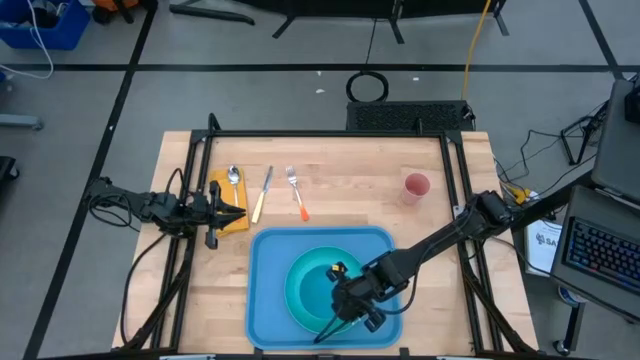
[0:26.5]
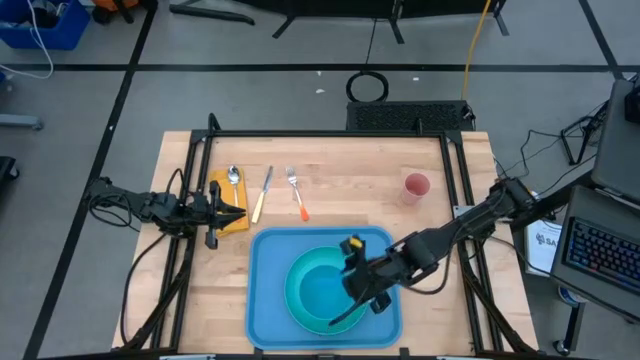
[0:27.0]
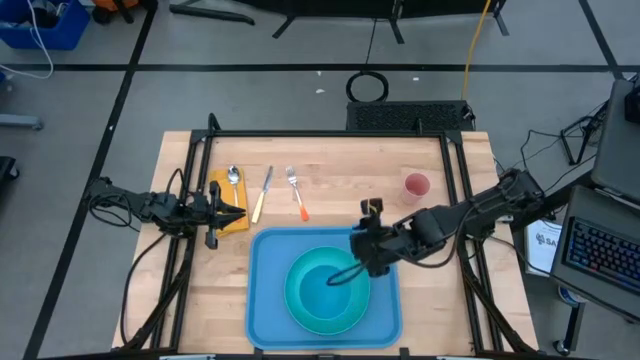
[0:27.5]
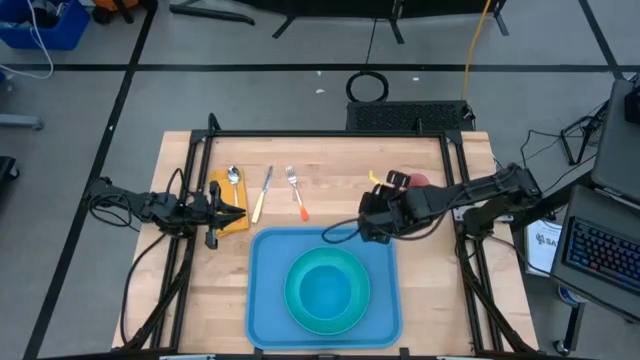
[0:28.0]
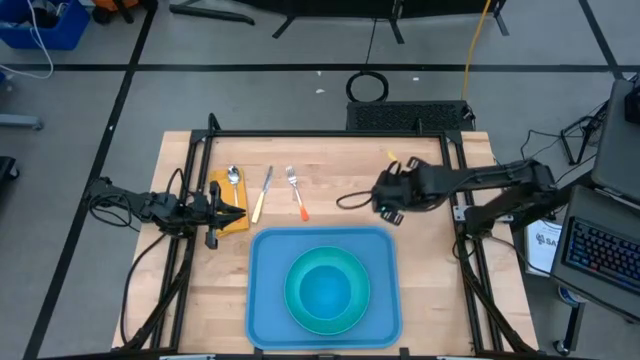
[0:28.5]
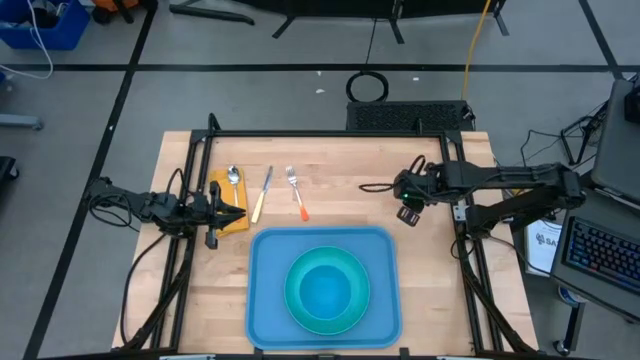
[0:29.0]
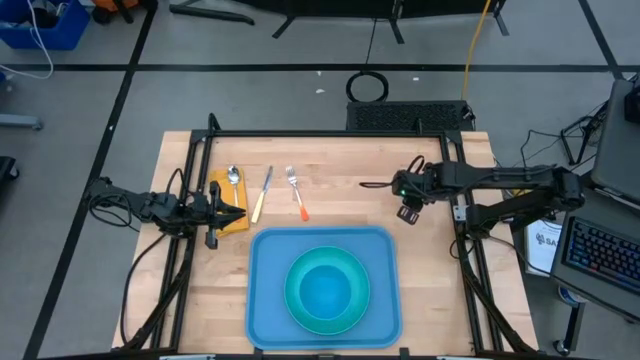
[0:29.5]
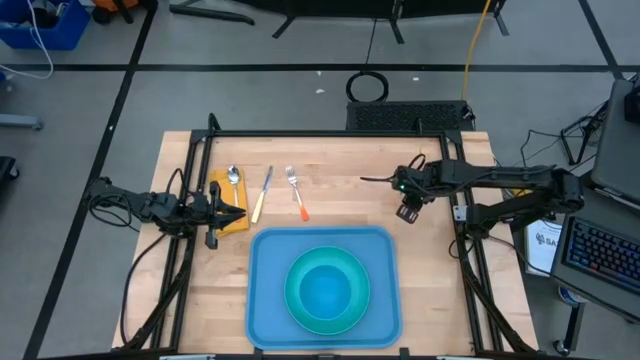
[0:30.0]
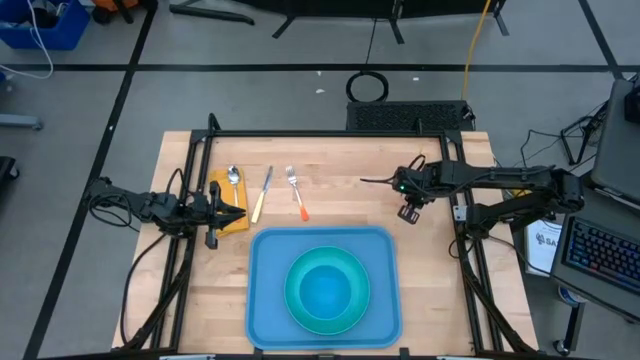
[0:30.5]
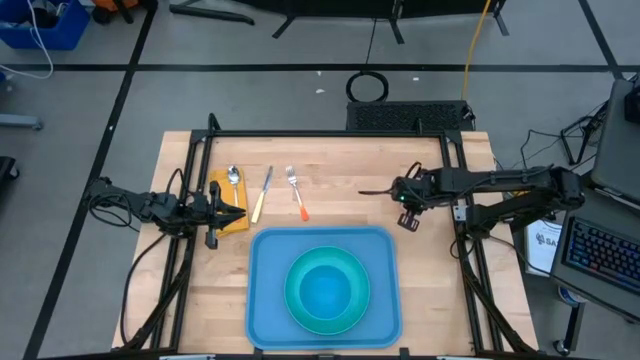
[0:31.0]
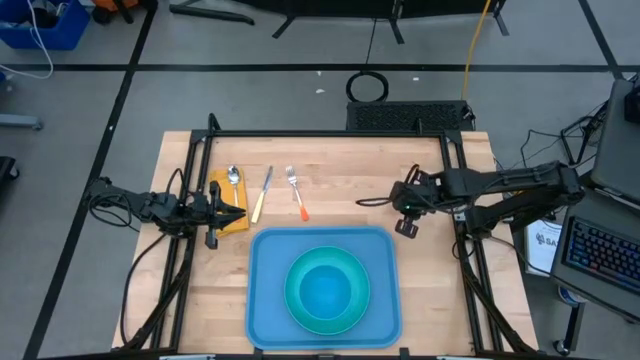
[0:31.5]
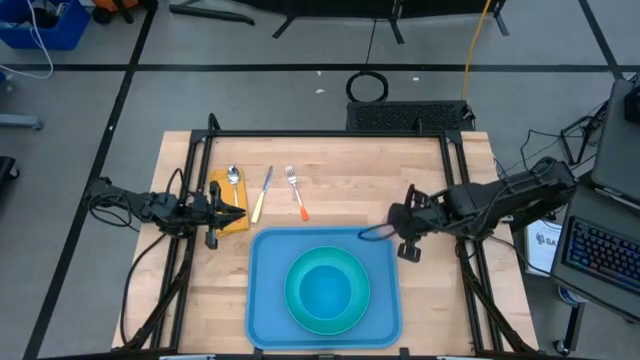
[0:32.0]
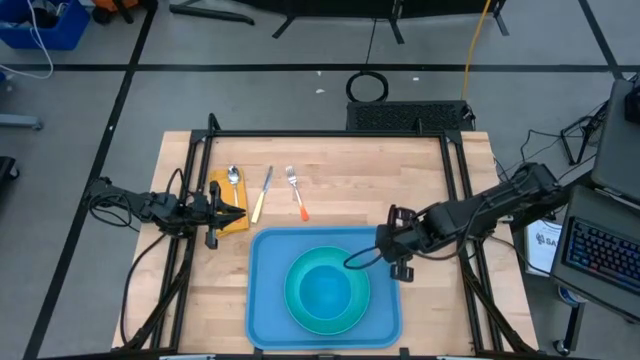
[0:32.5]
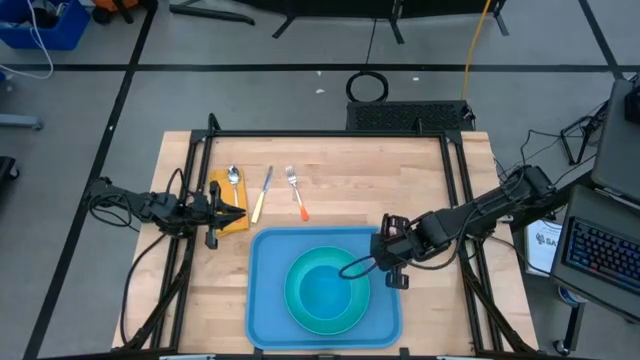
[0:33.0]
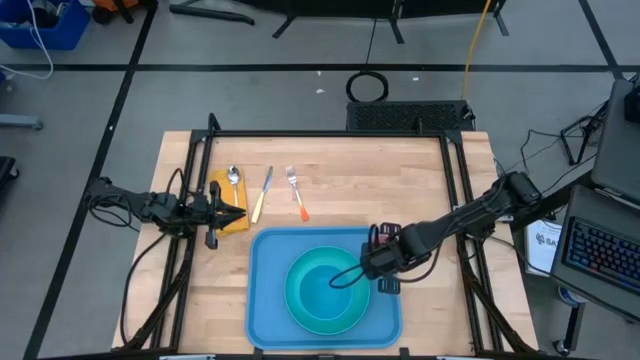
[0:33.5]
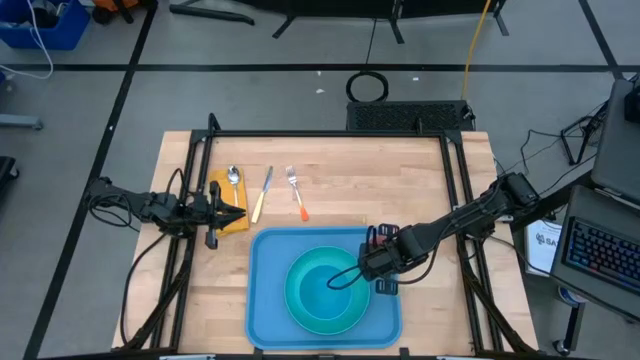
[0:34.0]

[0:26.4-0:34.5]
Task: Set up tray
Put the pink cup at the top right of the blue plate

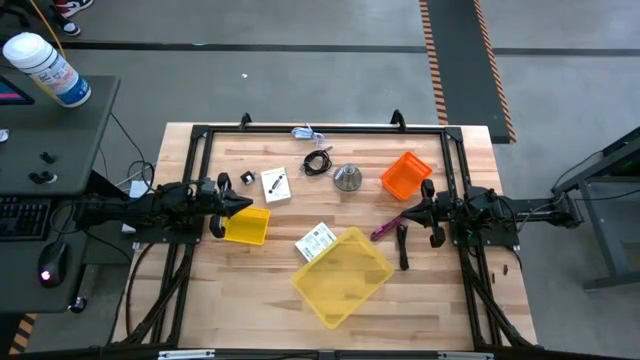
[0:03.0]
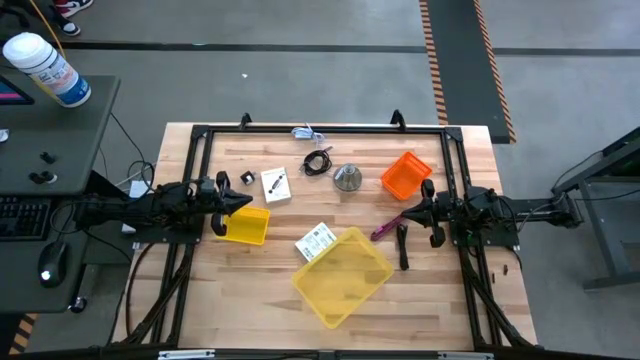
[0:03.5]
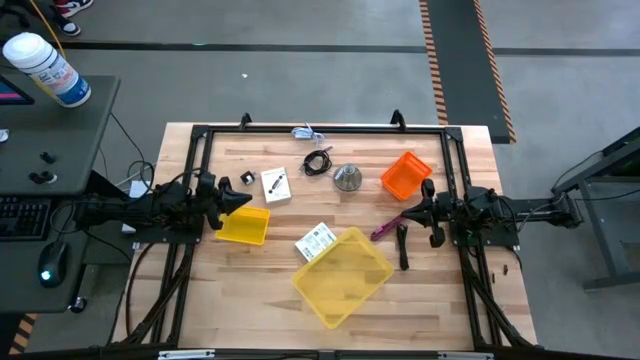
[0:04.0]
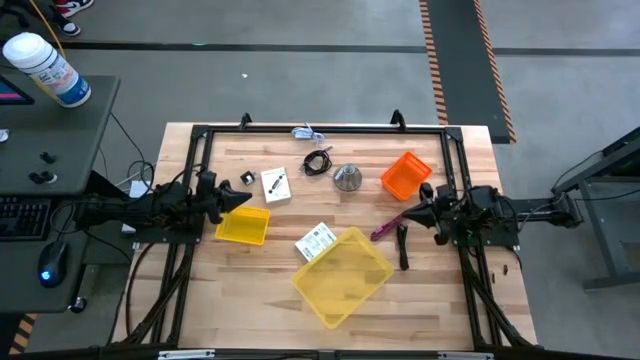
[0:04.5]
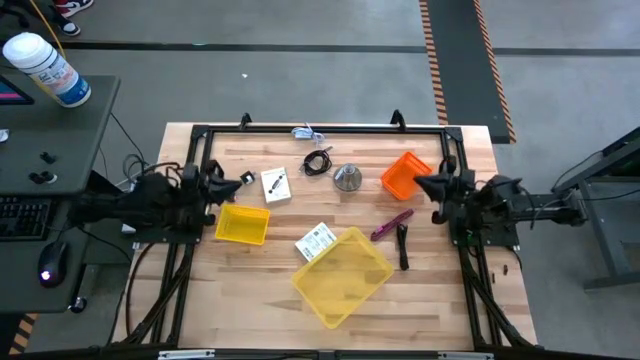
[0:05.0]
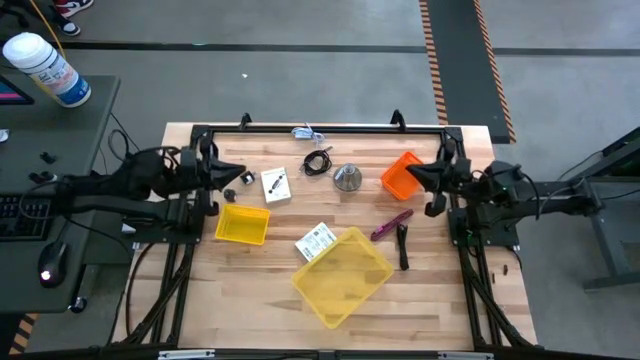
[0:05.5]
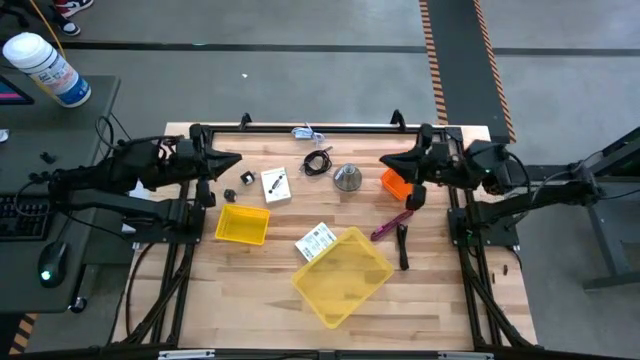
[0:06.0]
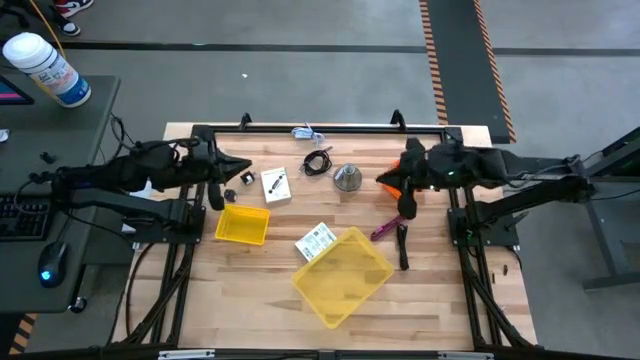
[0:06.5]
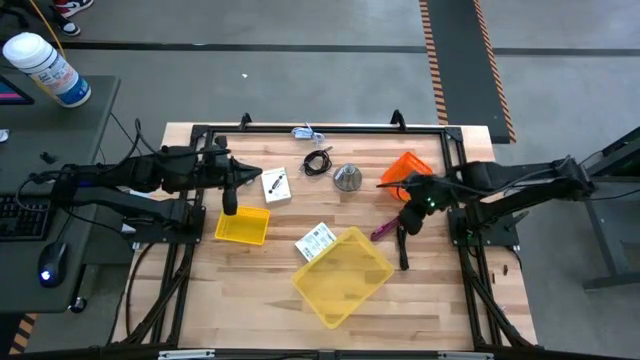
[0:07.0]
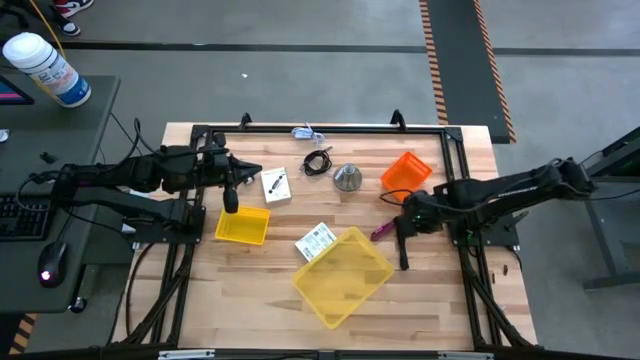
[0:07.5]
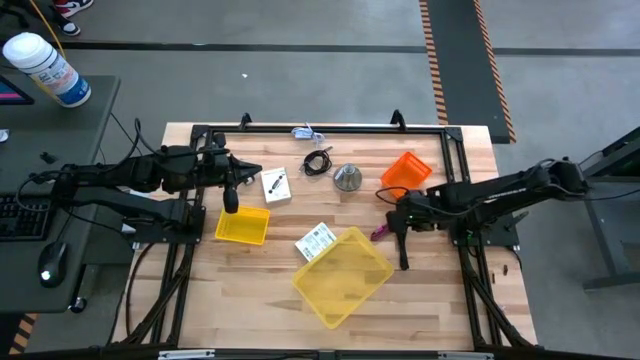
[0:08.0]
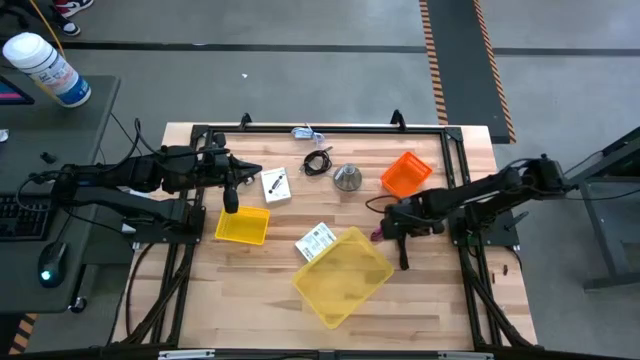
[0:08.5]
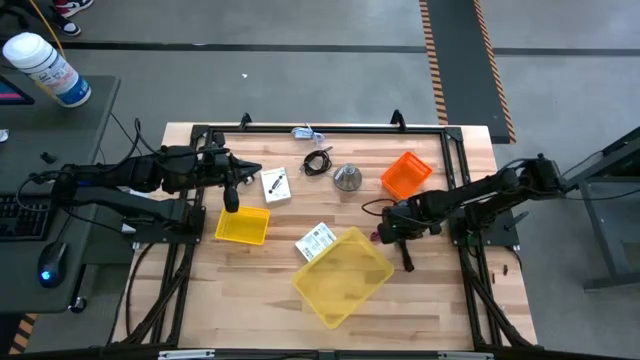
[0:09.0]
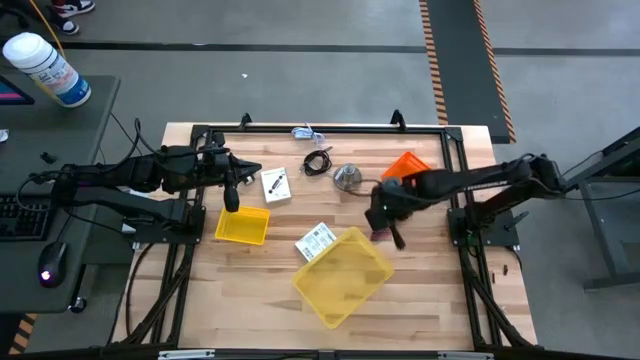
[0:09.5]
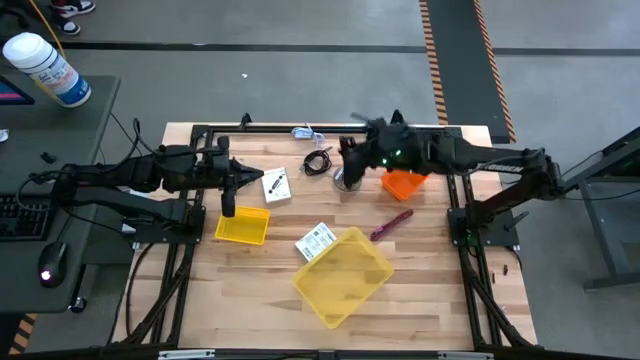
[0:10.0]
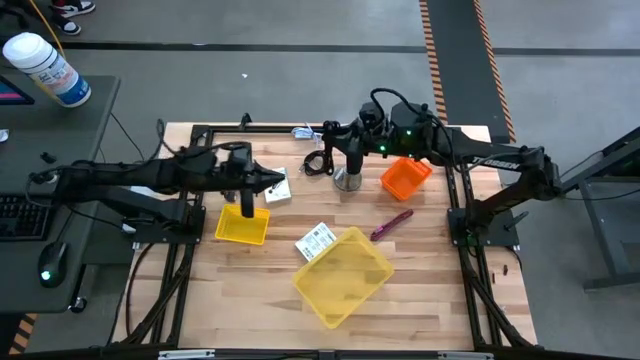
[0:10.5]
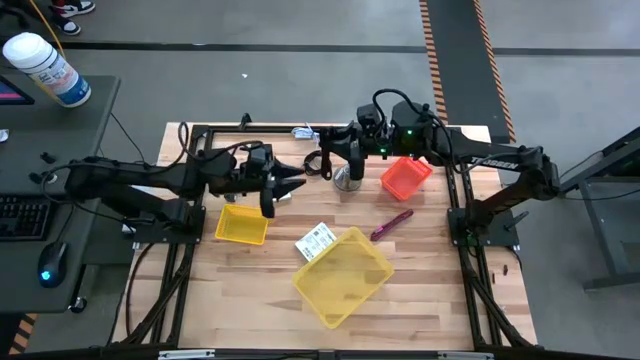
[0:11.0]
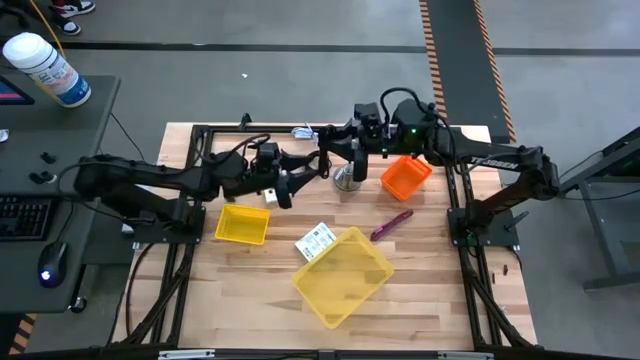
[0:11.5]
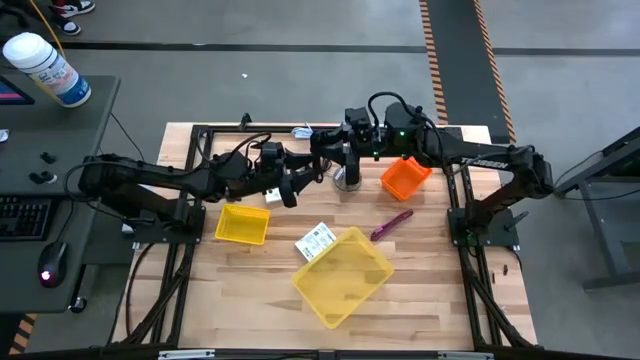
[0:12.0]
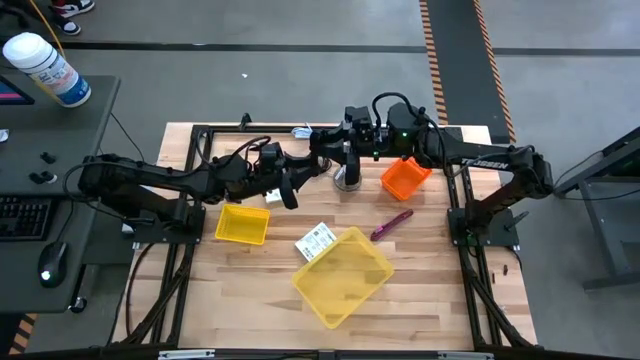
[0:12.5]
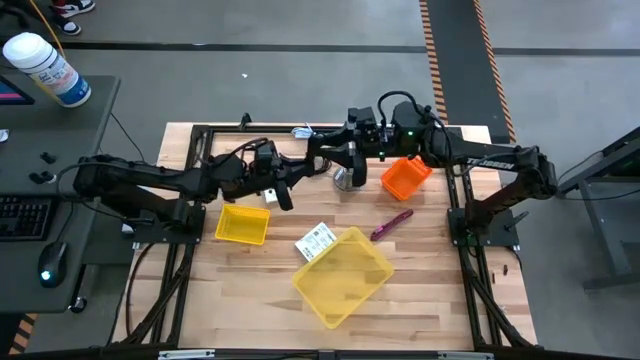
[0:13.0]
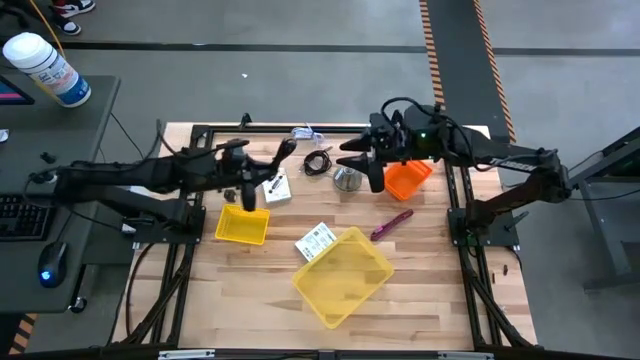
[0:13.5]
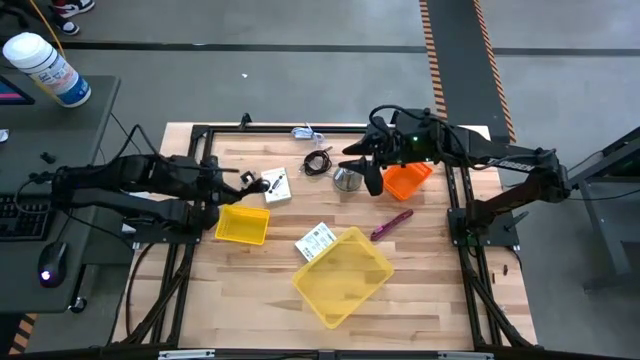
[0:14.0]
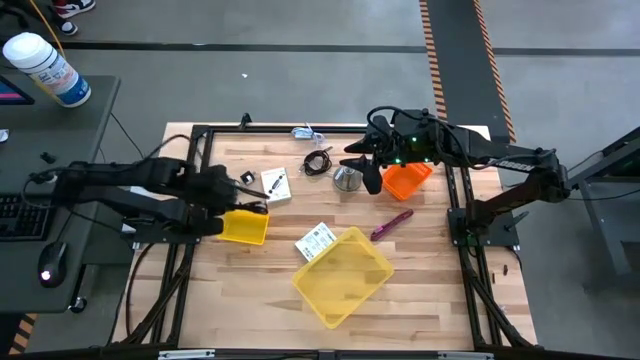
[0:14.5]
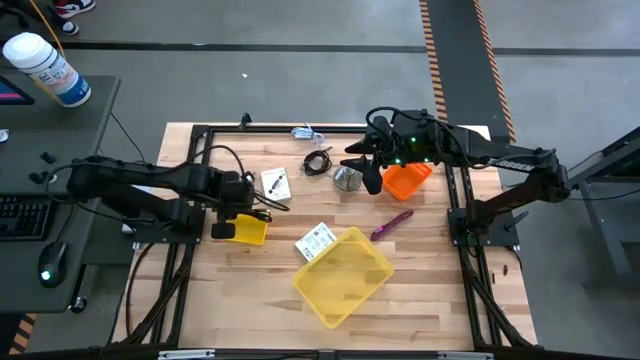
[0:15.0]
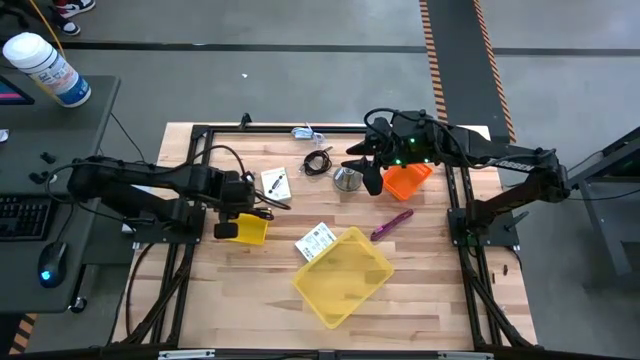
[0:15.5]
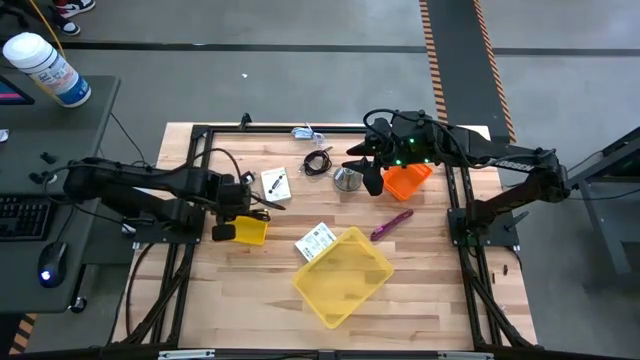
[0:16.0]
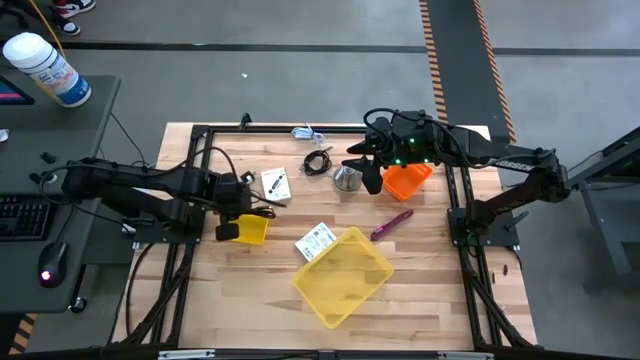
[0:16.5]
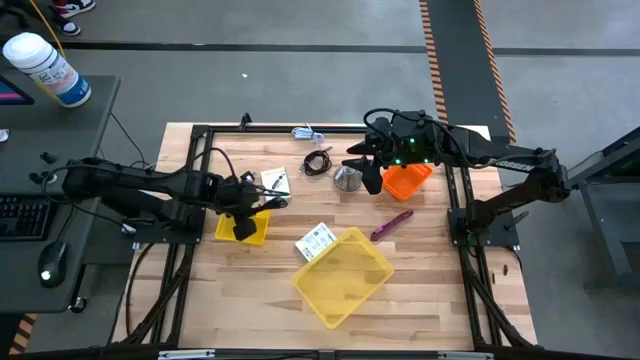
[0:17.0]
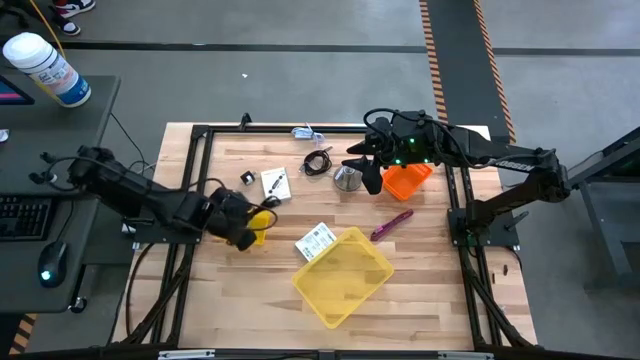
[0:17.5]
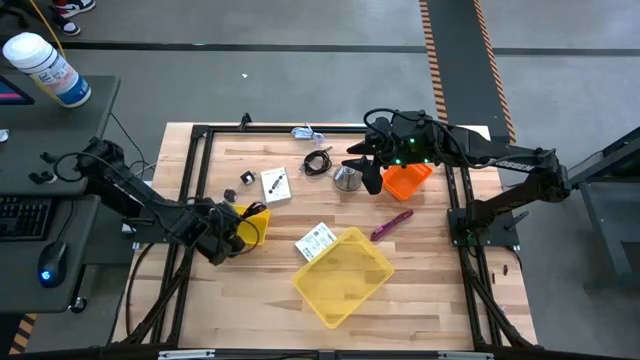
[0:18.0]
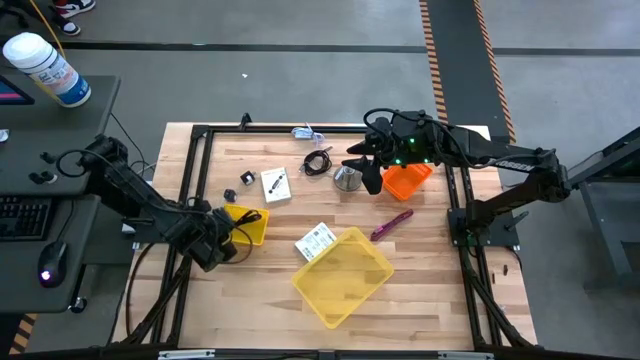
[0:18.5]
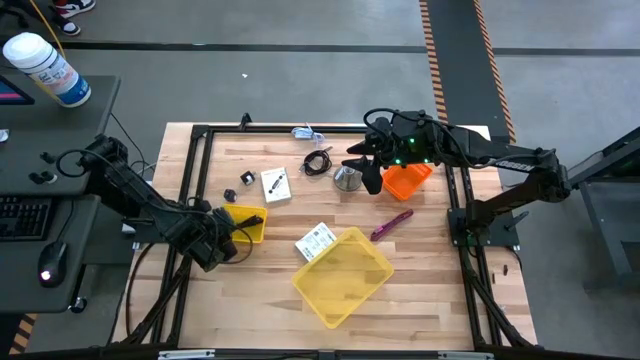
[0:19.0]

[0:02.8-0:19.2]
Task: Pick and place items into bin
Put the bottom black cable charger into the left yellow bin
